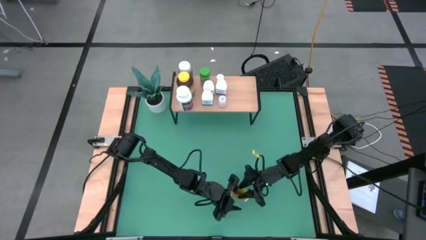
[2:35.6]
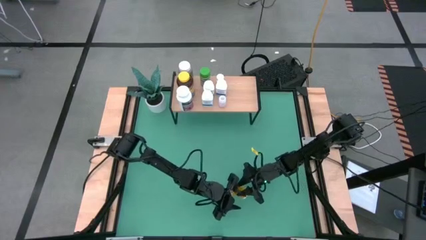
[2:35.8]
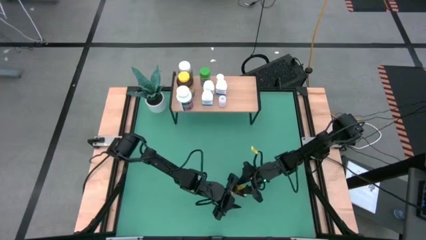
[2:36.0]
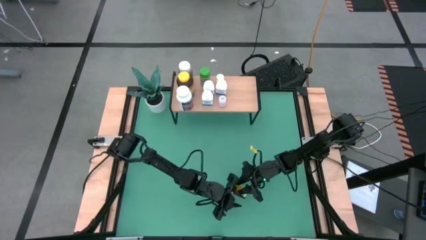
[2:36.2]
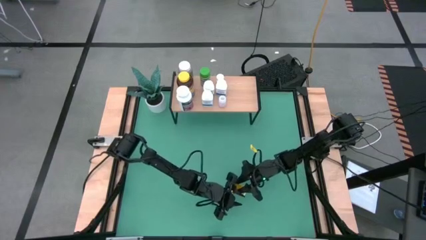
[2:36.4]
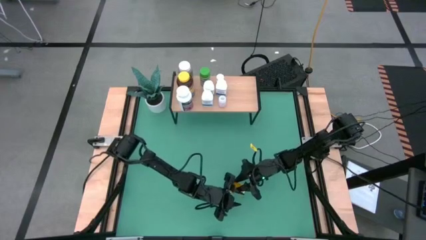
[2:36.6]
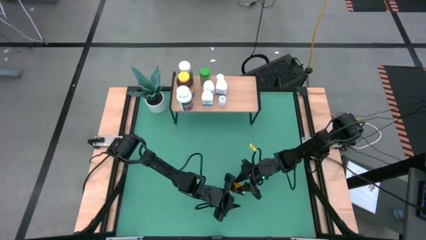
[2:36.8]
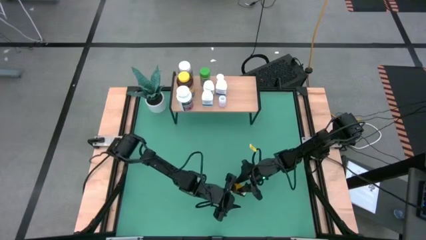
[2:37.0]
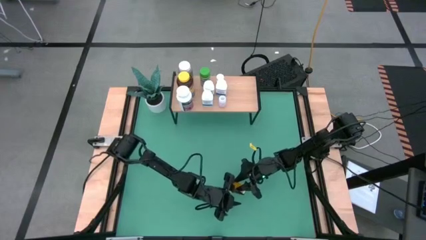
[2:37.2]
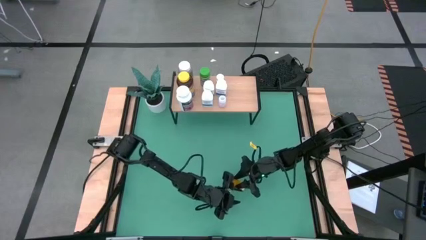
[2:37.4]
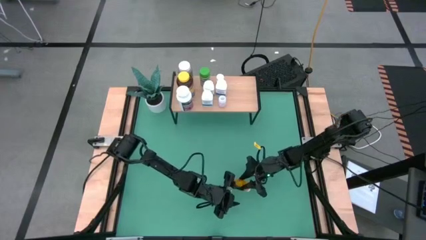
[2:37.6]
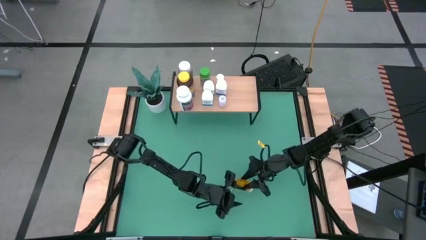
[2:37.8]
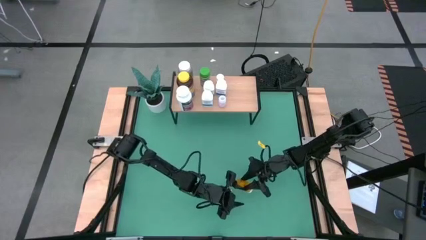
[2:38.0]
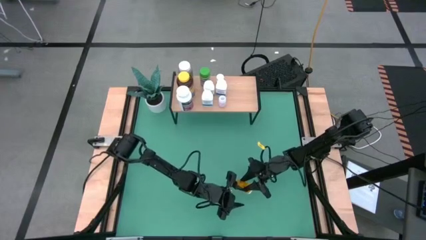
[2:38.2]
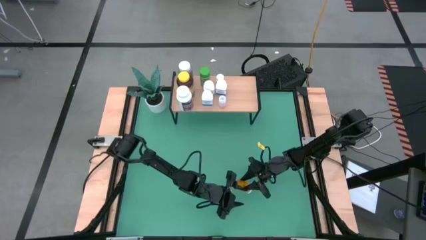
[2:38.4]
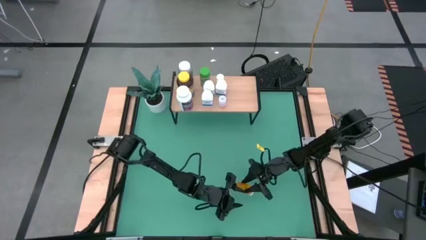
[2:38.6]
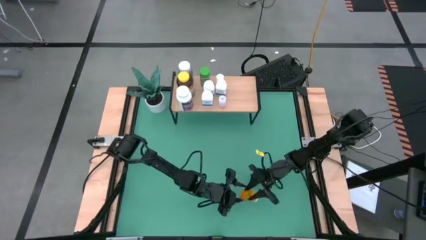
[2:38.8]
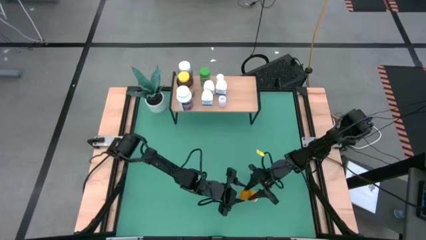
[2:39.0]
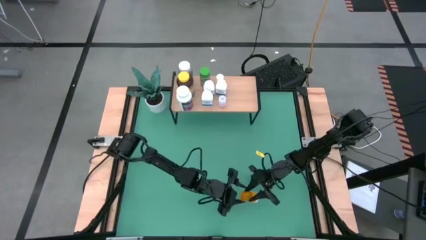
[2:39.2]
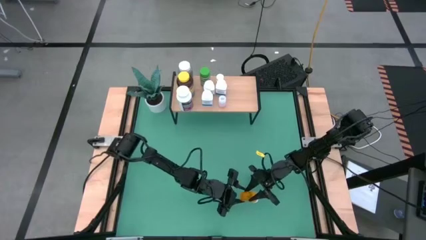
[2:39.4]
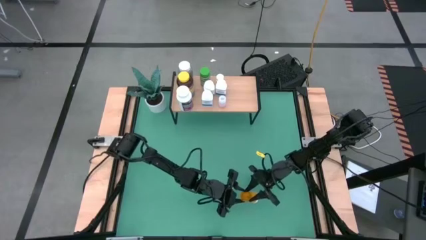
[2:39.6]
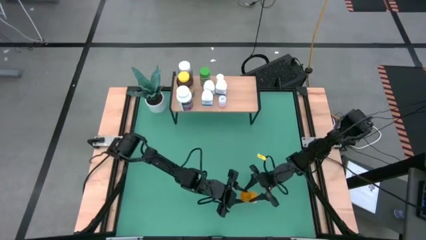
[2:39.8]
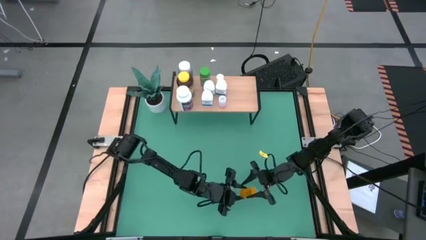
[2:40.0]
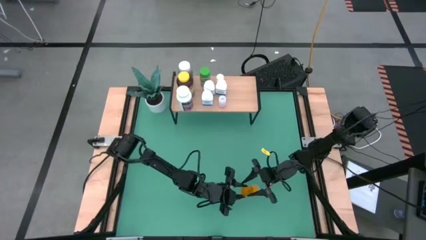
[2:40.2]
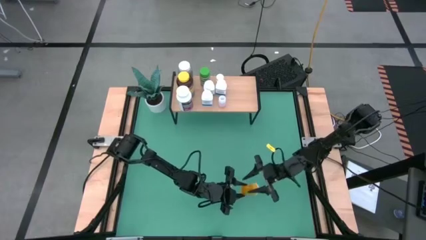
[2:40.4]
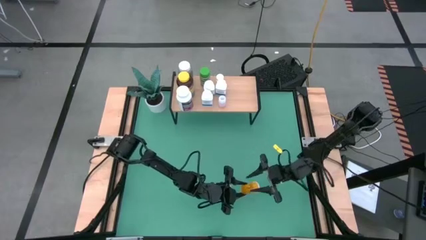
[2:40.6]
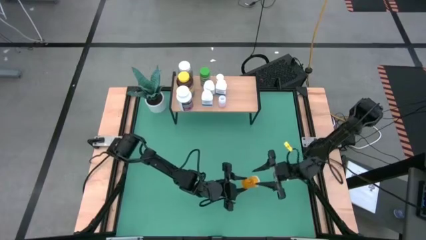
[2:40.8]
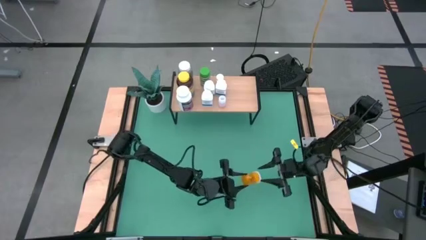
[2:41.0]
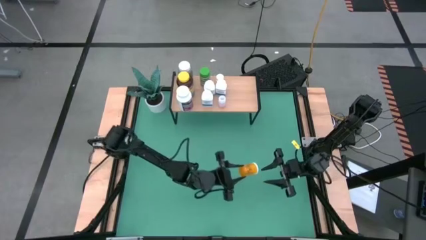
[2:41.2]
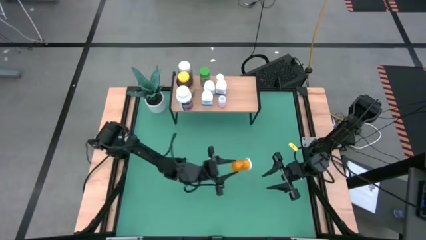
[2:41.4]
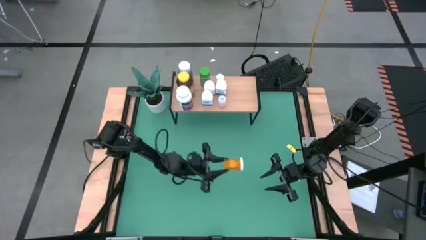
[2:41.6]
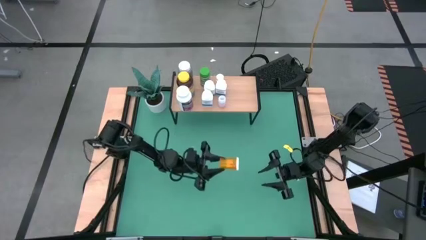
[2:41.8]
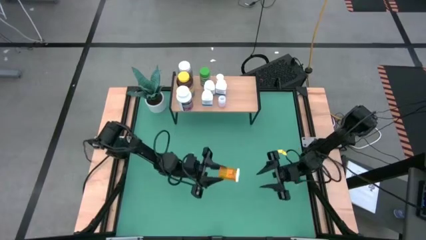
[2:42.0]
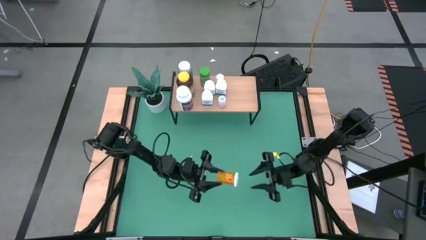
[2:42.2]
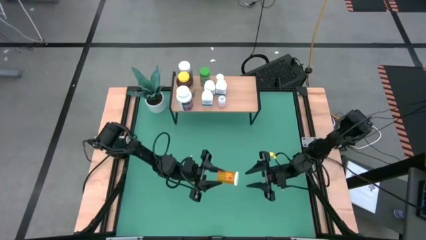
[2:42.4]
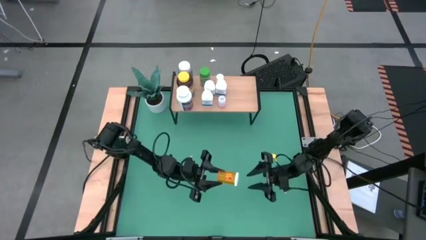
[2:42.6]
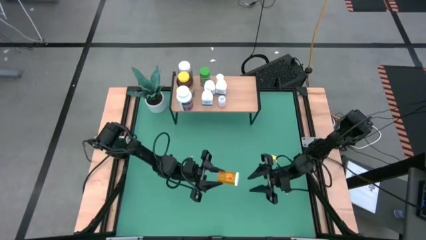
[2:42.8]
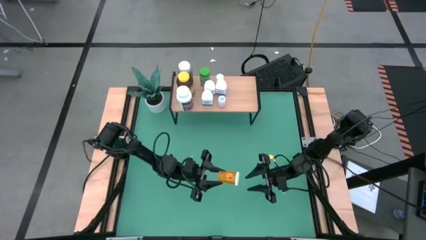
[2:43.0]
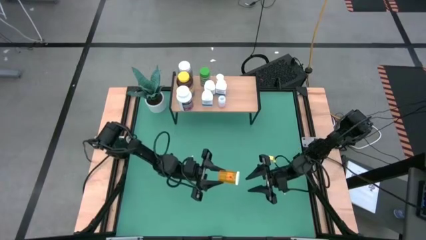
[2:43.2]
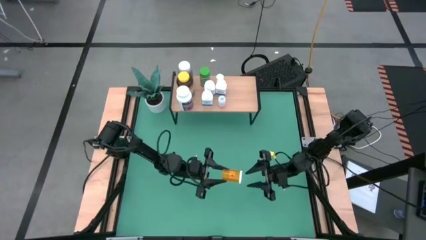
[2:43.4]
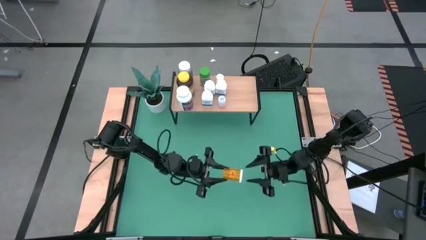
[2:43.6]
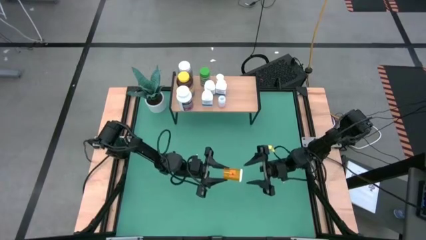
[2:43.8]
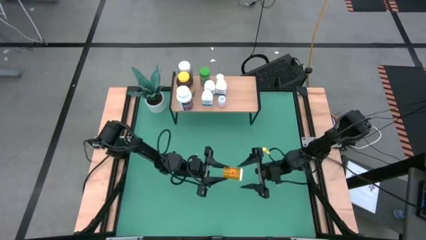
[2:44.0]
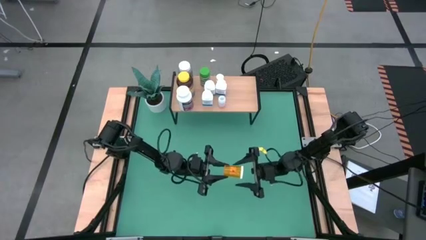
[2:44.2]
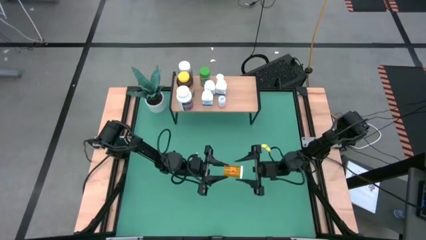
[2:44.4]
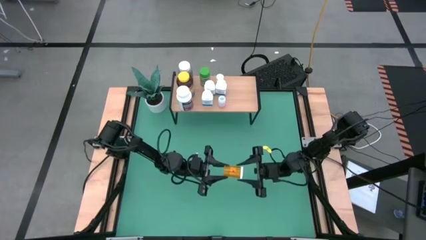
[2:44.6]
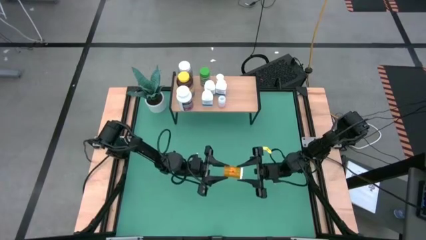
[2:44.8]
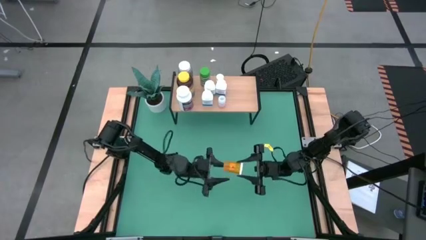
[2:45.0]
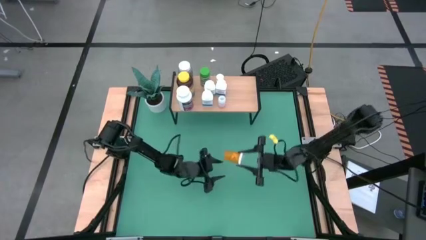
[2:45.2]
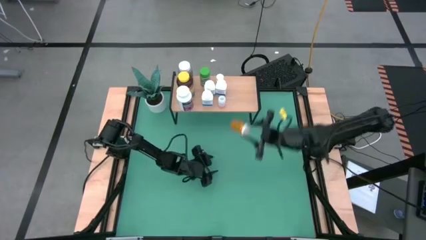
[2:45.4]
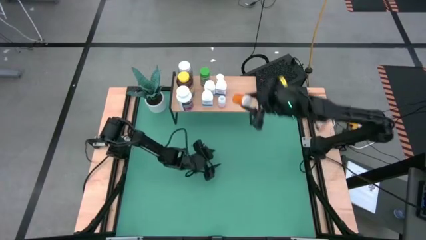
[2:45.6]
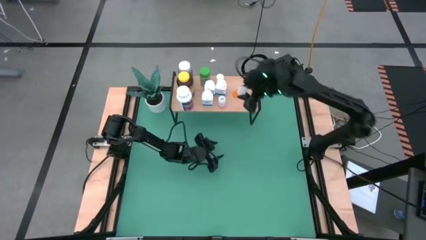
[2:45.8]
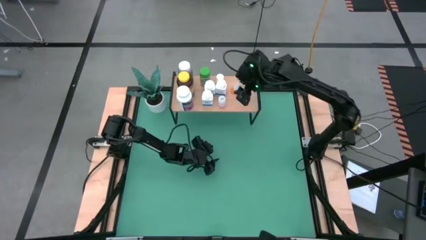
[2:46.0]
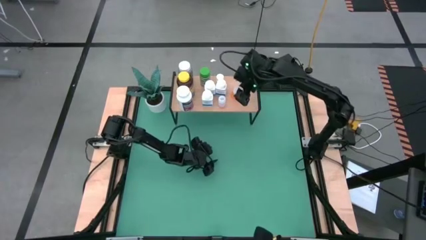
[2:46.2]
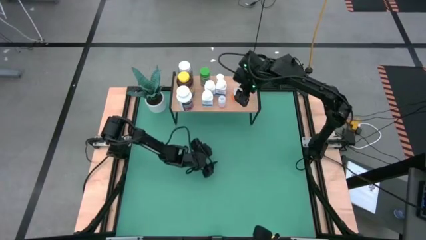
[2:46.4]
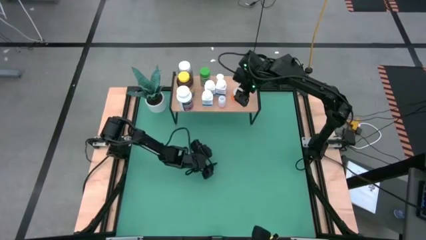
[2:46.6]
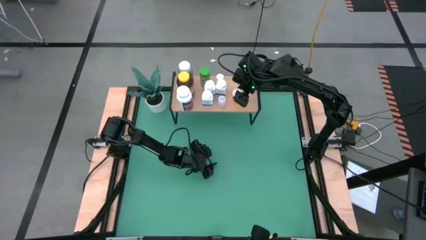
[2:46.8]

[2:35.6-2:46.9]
Task: Pick and place medicine bottles onto shelf by color
Put the orange pill bottle on the shelf
